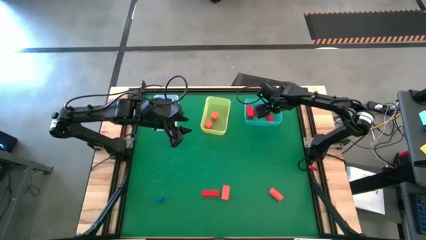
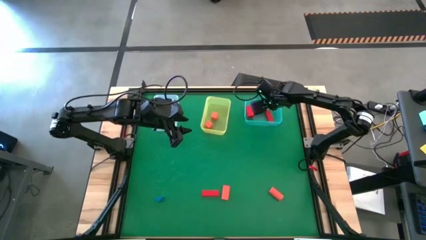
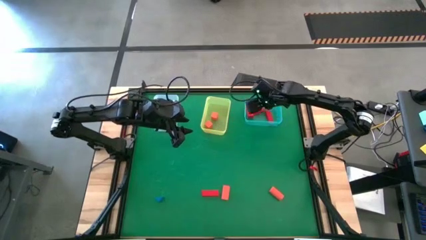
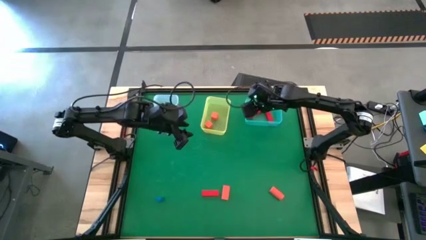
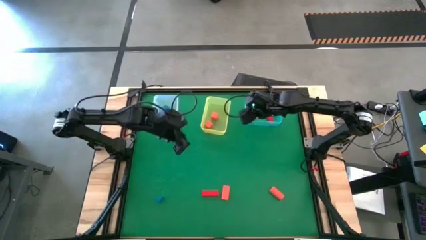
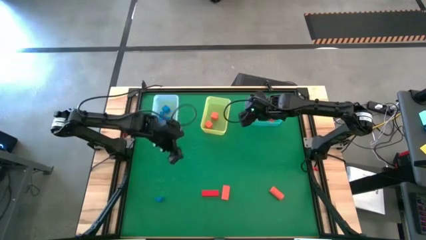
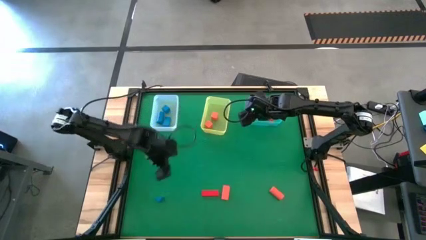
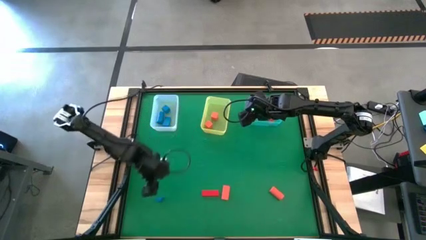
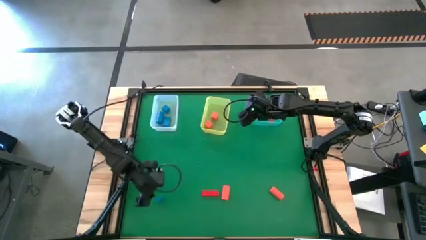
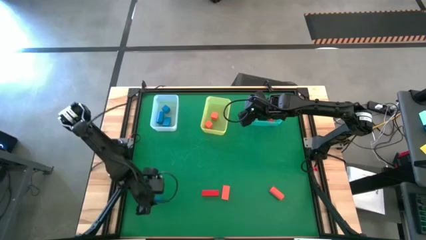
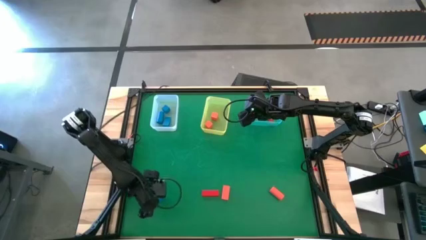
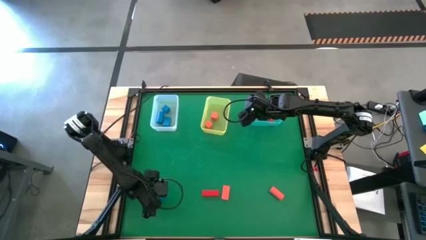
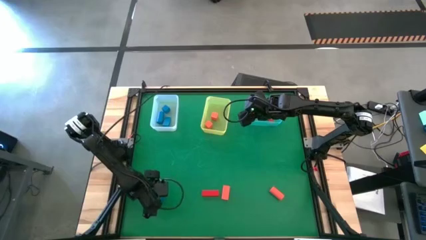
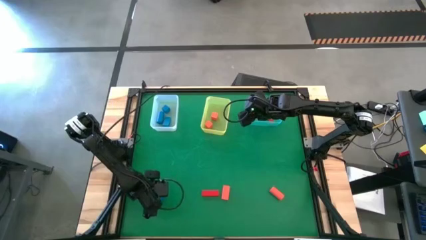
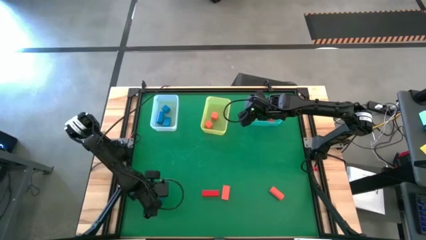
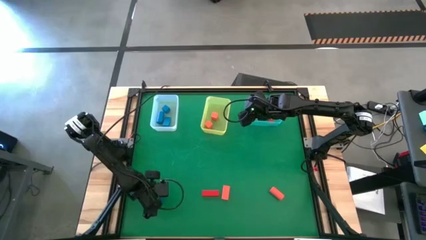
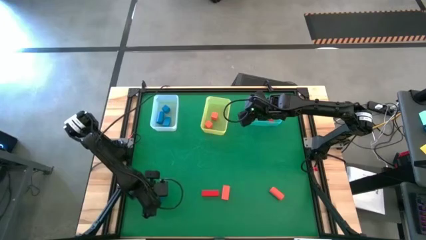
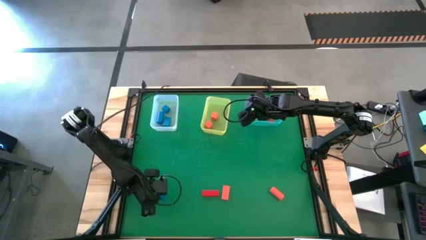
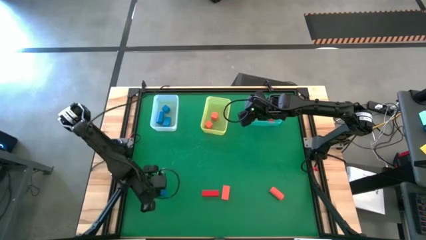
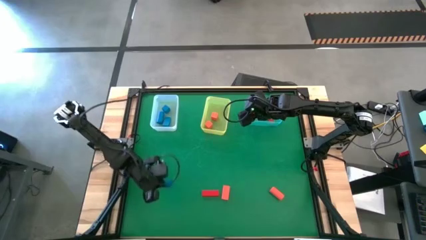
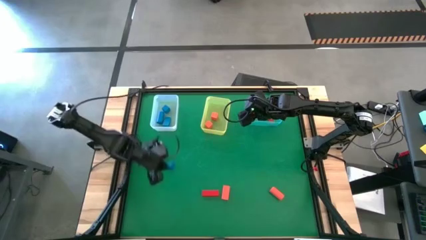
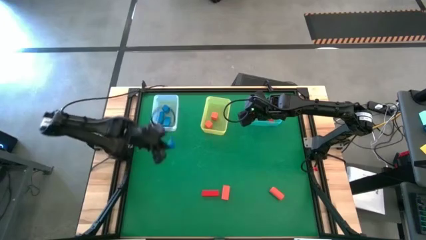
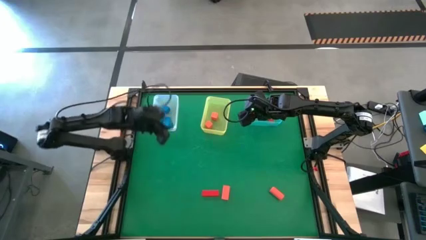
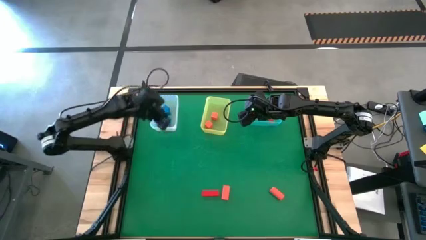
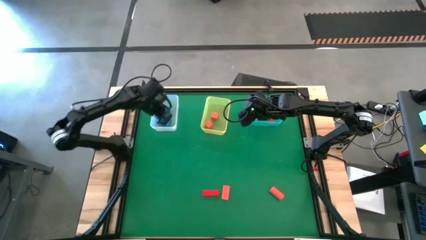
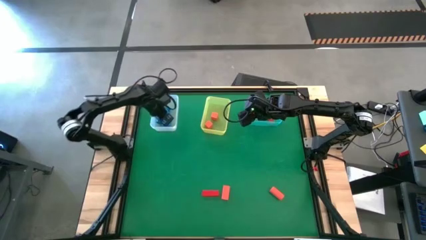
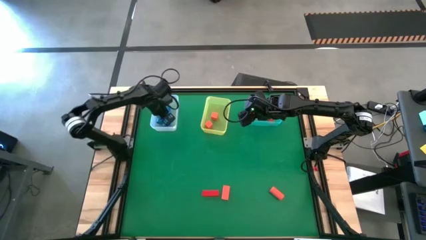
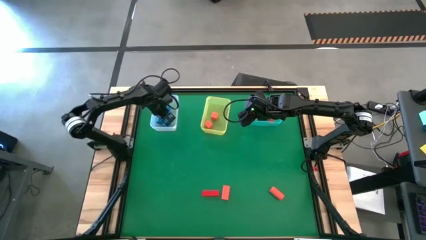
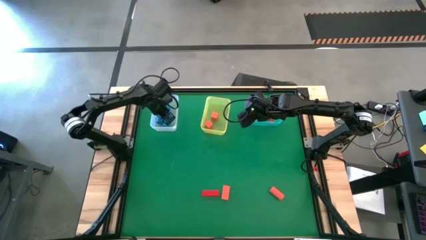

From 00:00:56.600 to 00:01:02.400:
Task: Sort & place blocks by color
Put the blue block into the white bin

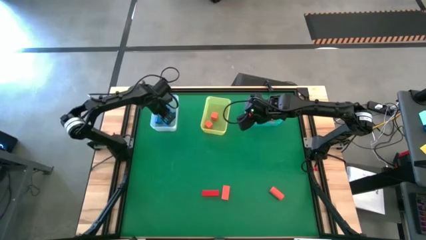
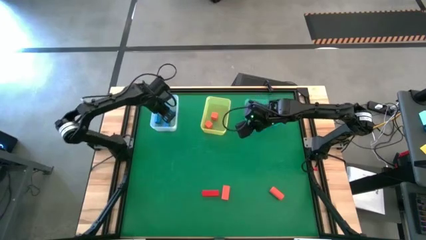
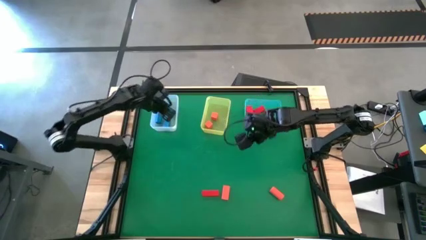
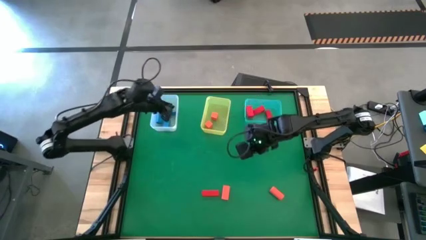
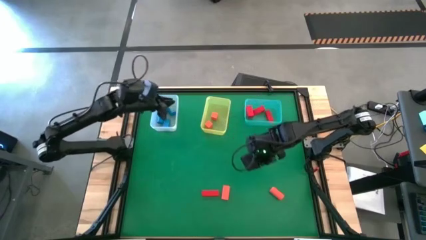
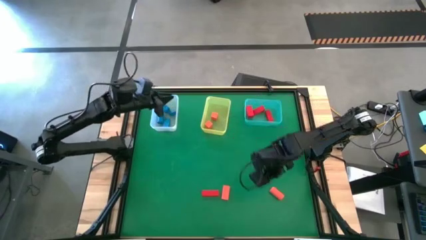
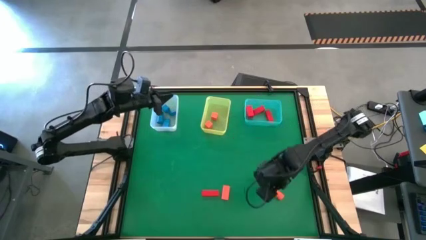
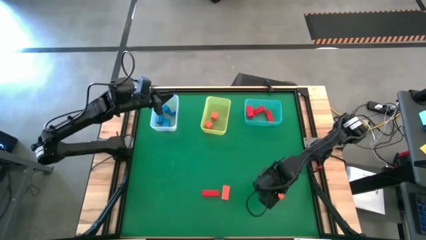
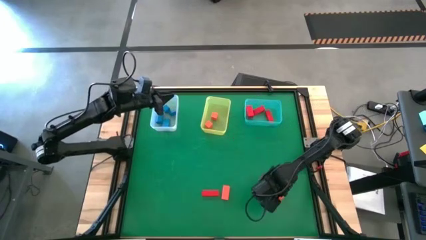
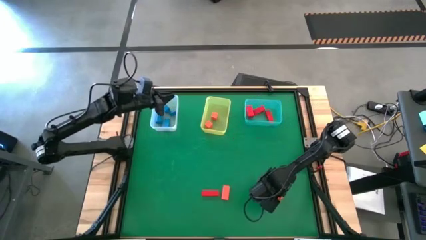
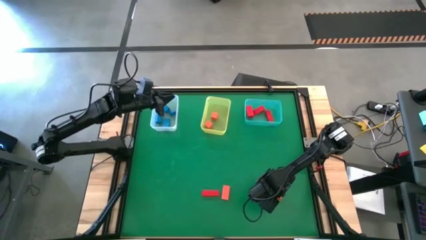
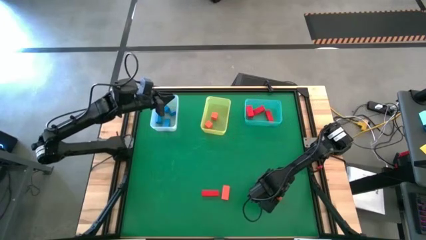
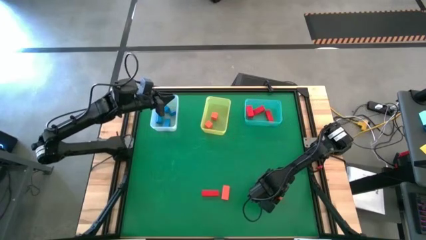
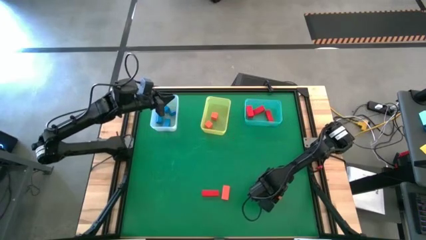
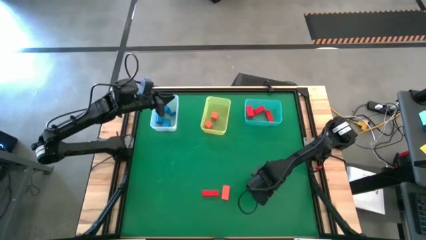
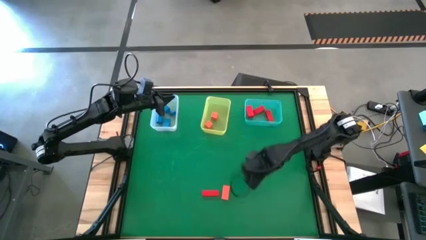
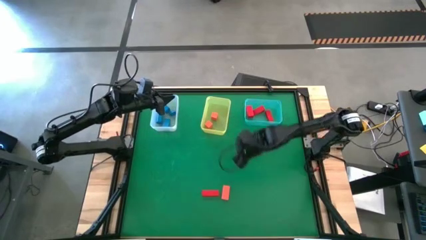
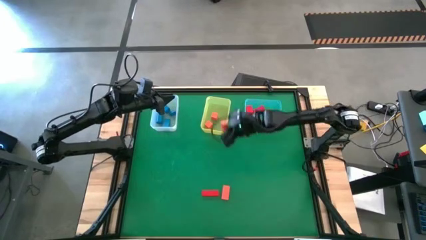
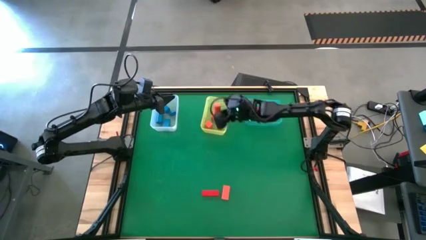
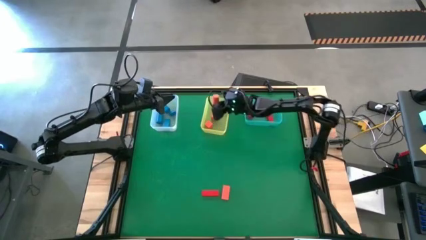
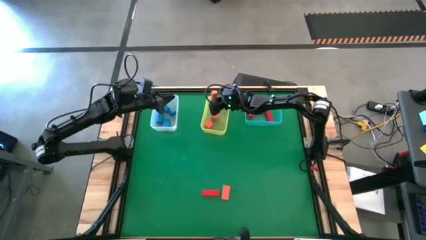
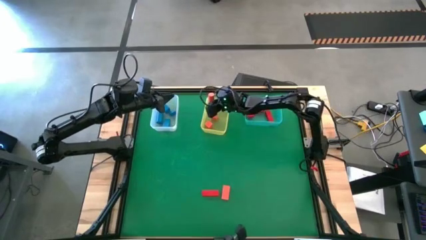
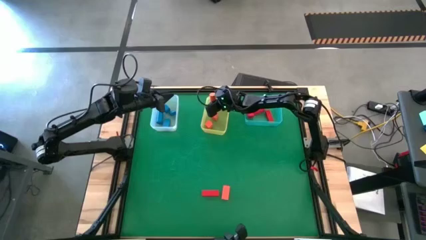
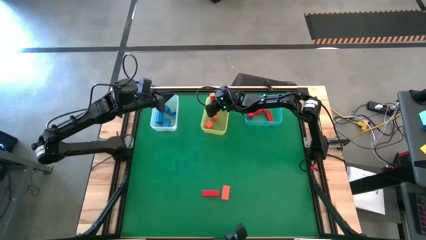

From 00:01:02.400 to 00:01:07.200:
Put the orange block into the yellow bin

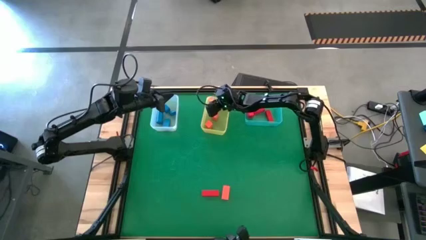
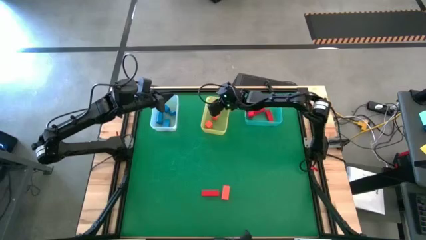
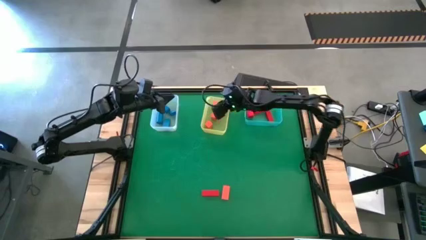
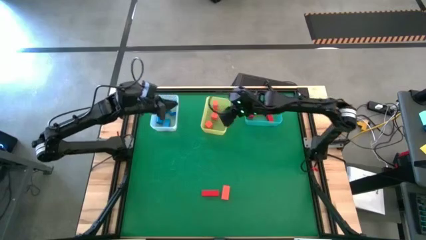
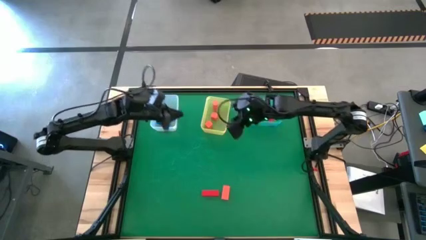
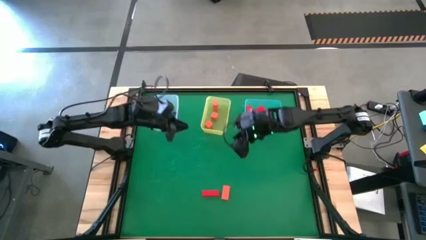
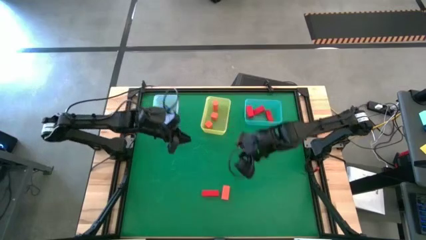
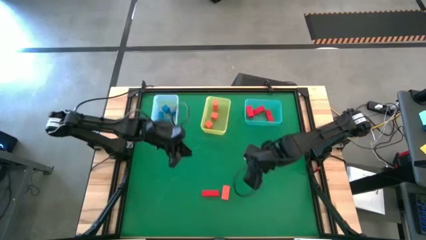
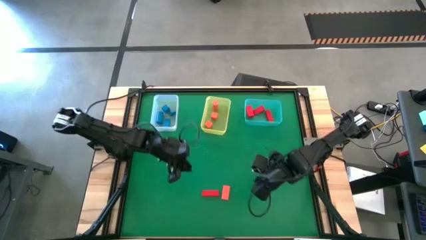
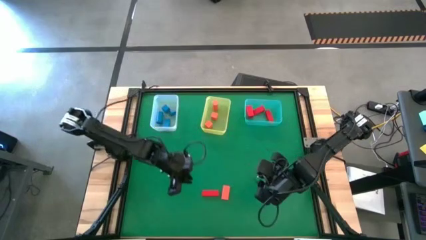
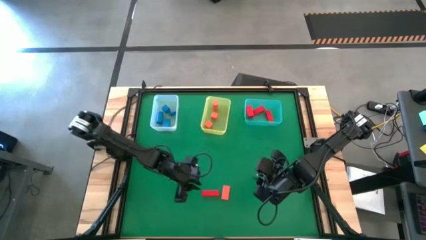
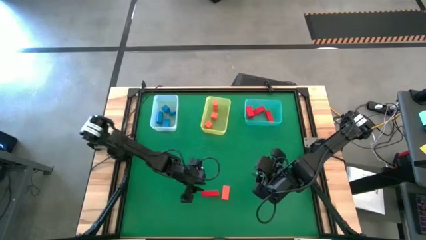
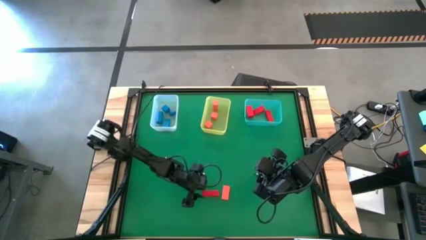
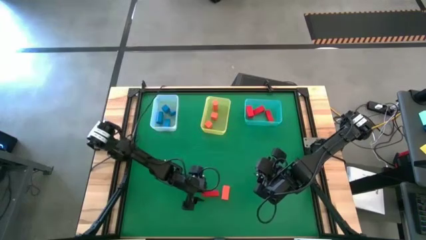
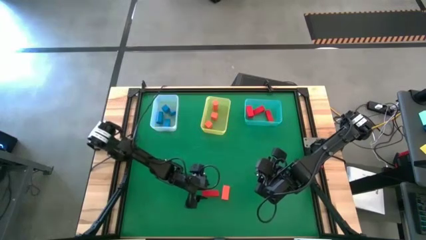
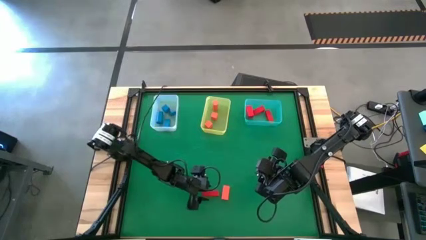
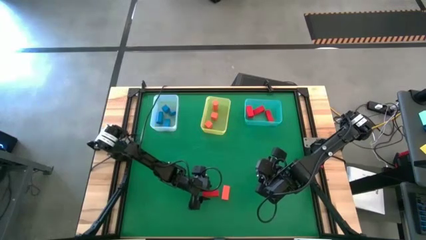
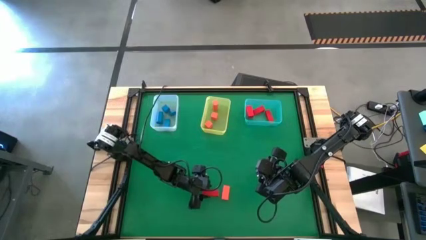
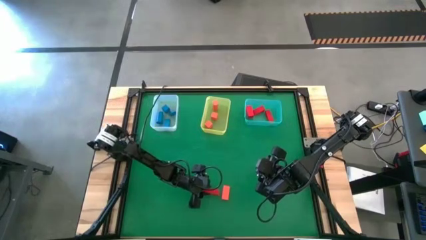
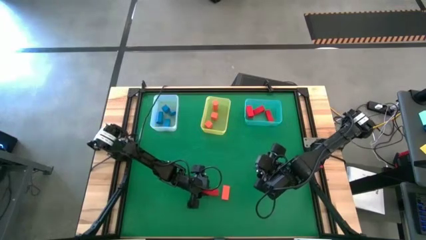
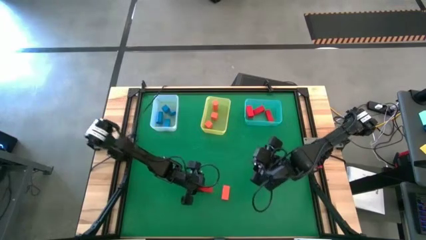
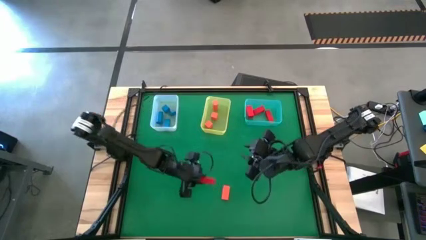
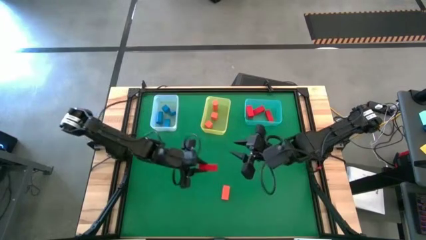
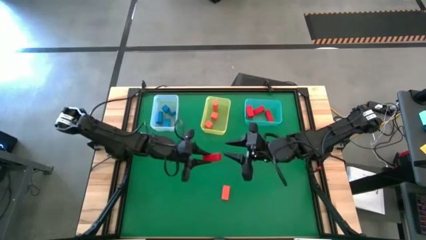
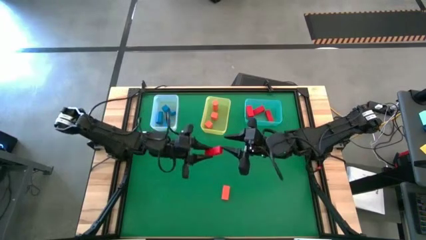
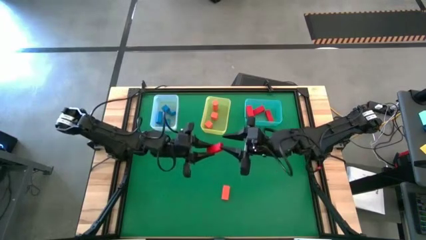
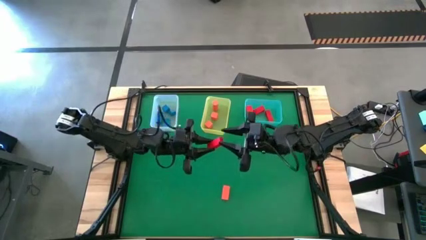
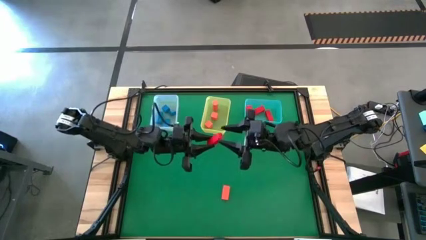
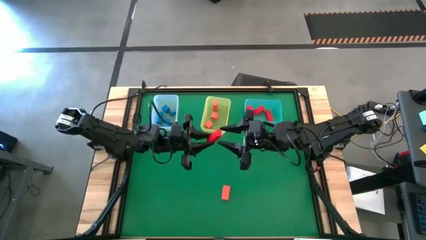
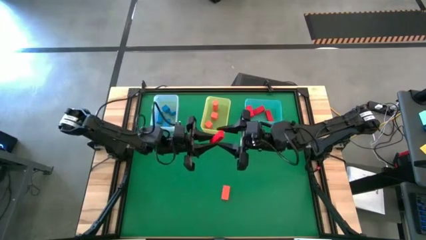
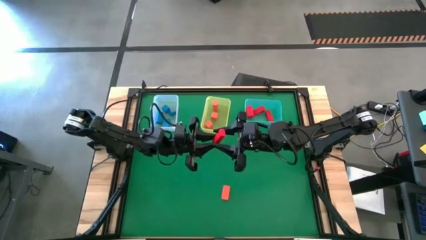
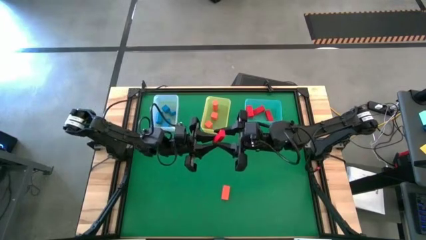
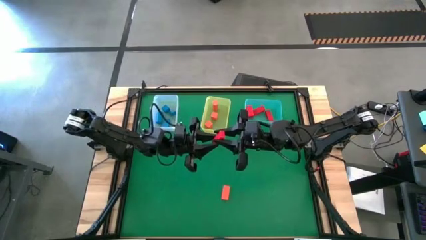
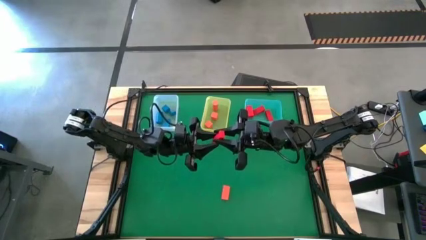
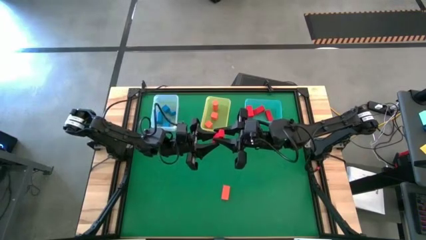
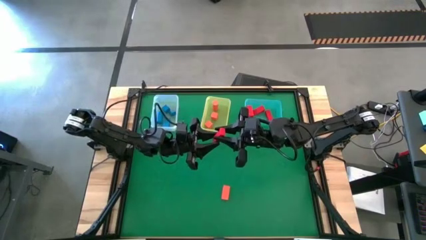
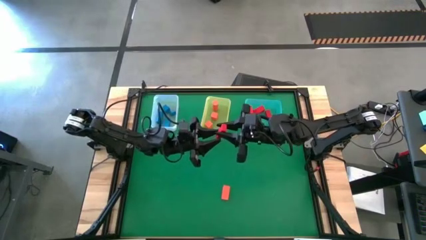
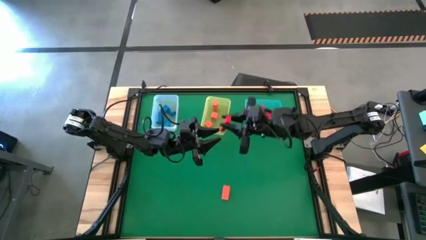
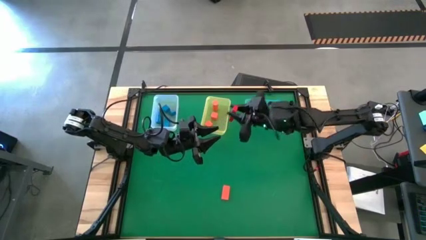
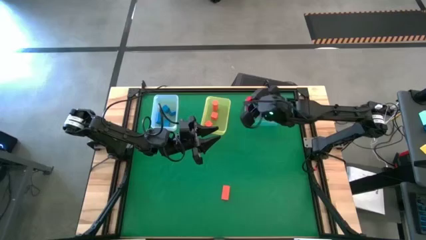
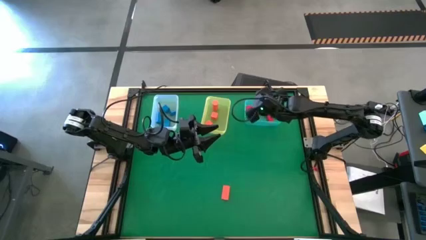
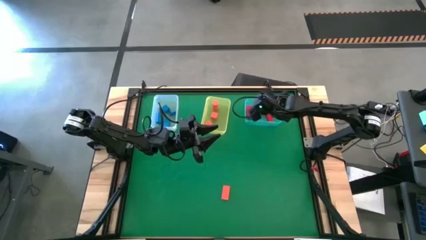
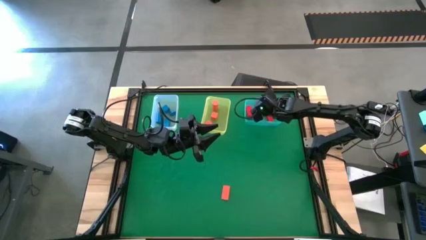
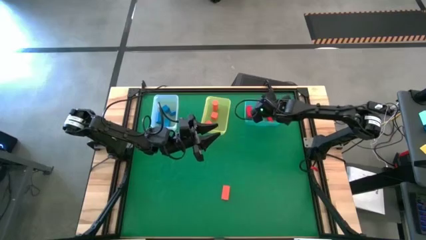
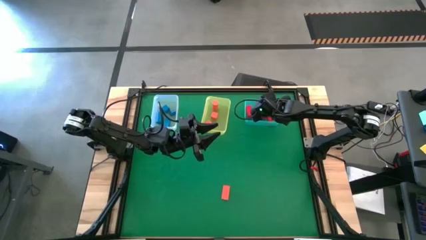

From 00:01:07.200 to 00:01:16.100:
Put the red block into the blue bin
